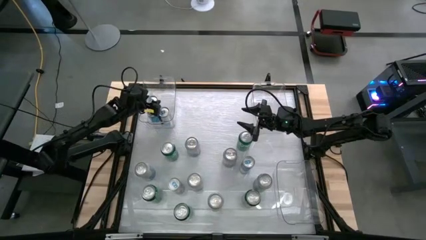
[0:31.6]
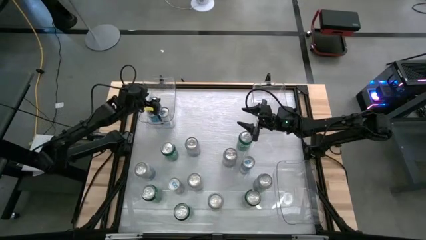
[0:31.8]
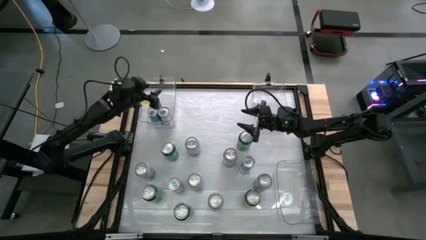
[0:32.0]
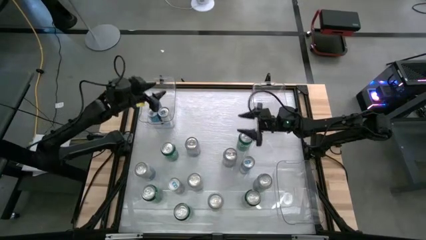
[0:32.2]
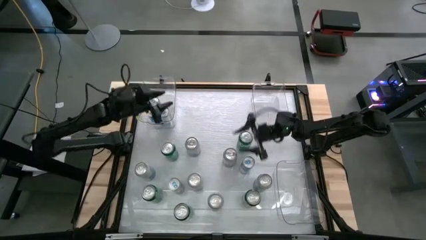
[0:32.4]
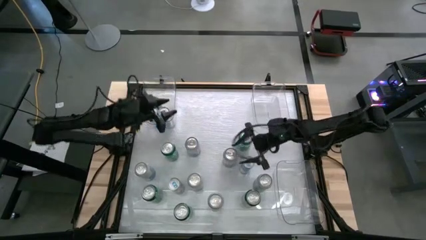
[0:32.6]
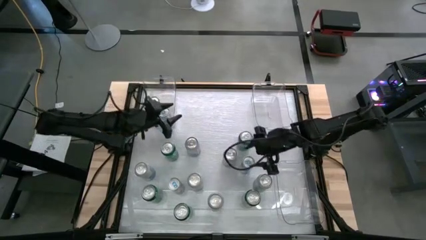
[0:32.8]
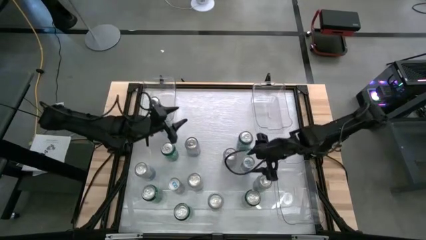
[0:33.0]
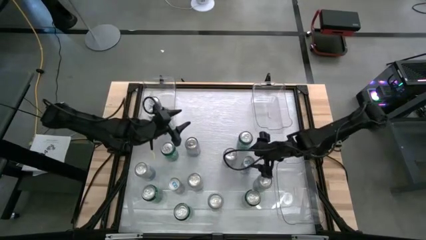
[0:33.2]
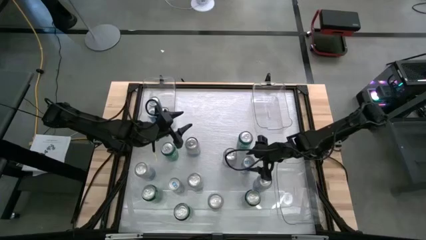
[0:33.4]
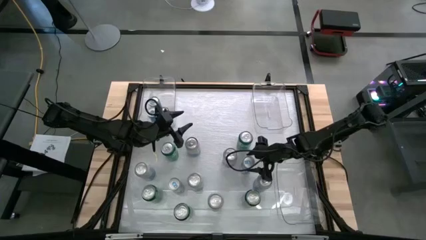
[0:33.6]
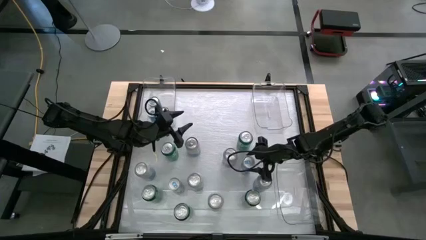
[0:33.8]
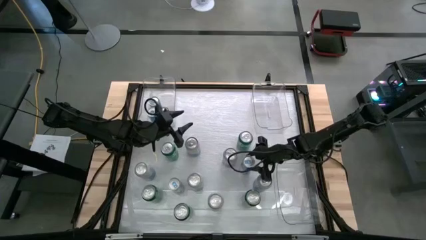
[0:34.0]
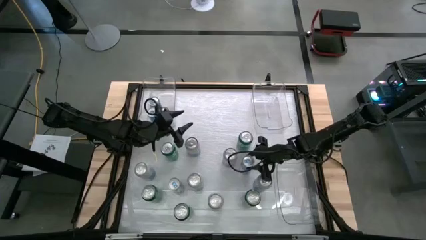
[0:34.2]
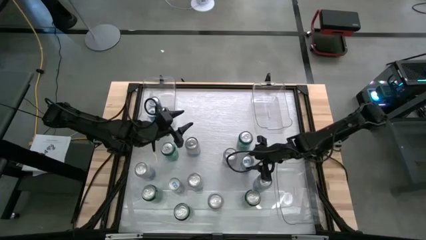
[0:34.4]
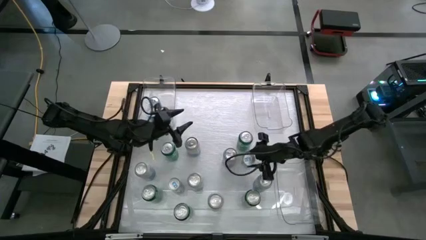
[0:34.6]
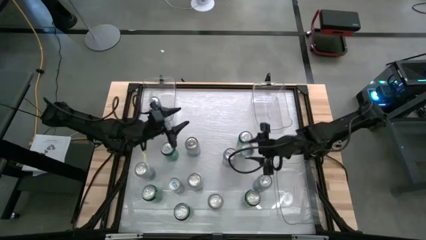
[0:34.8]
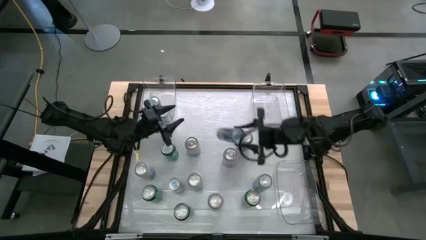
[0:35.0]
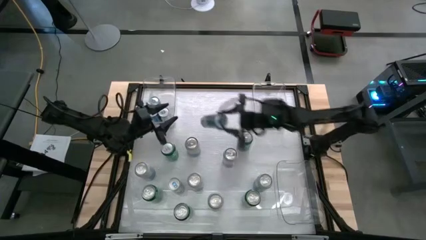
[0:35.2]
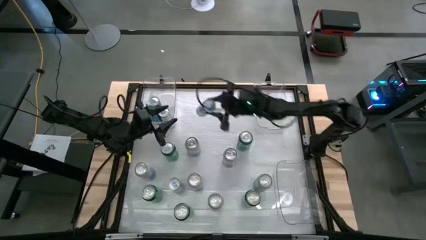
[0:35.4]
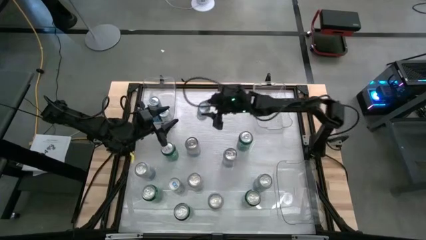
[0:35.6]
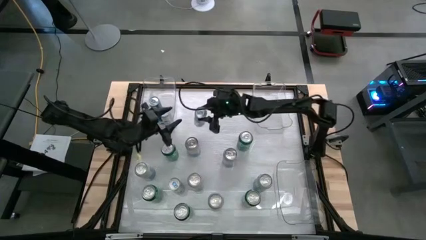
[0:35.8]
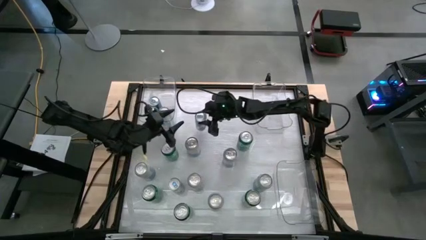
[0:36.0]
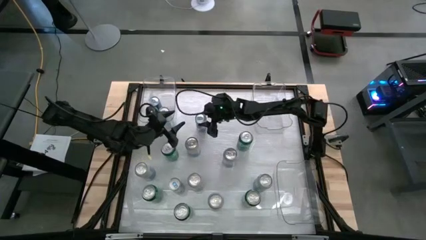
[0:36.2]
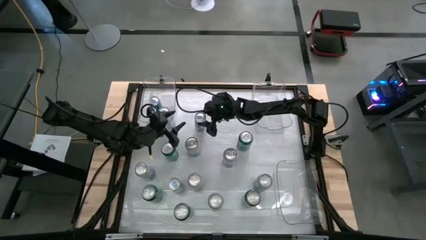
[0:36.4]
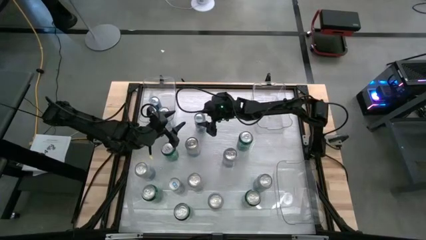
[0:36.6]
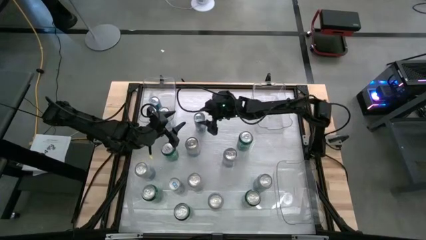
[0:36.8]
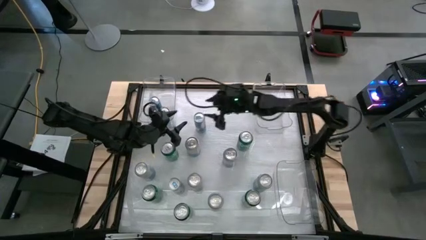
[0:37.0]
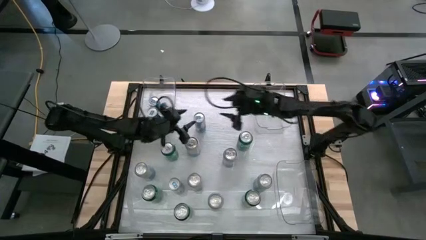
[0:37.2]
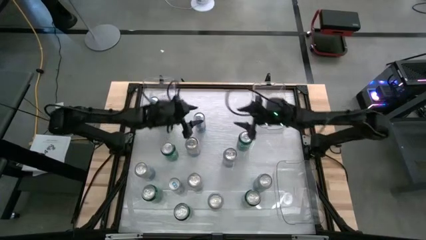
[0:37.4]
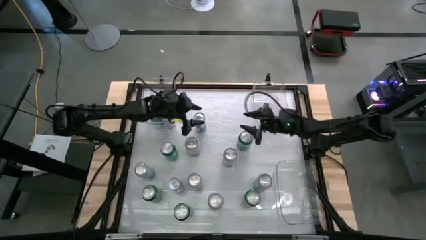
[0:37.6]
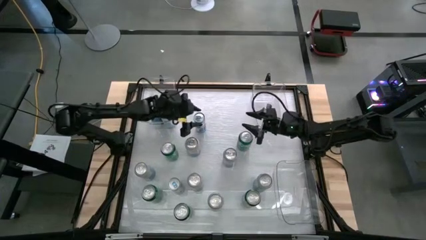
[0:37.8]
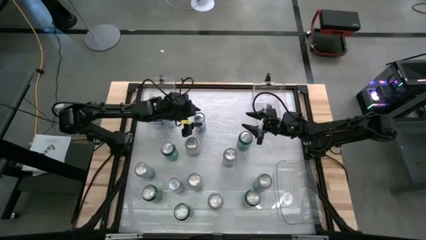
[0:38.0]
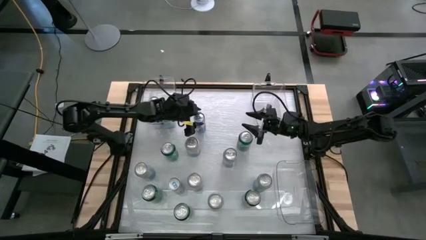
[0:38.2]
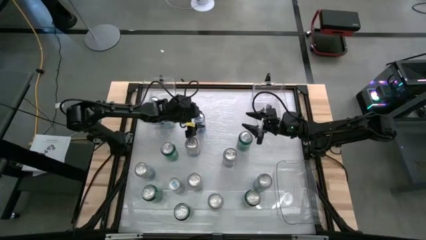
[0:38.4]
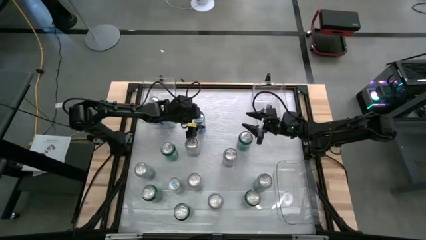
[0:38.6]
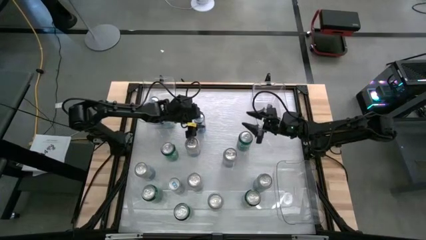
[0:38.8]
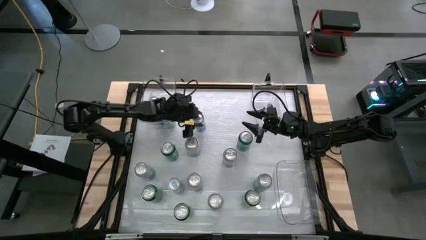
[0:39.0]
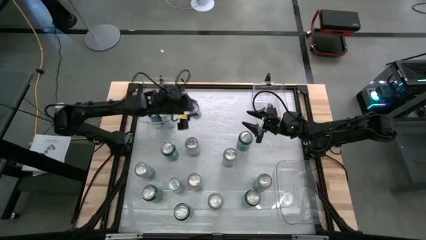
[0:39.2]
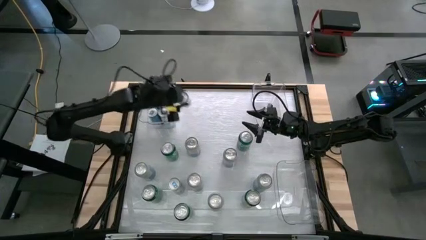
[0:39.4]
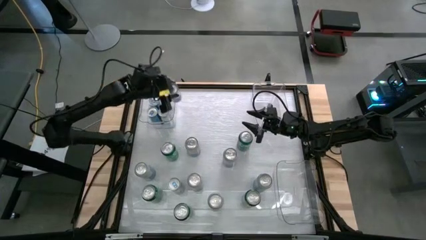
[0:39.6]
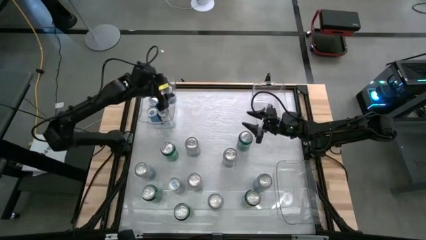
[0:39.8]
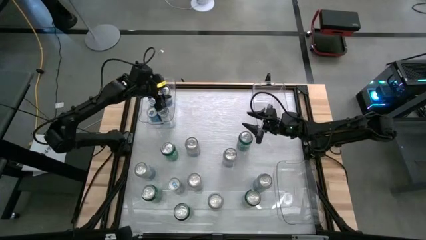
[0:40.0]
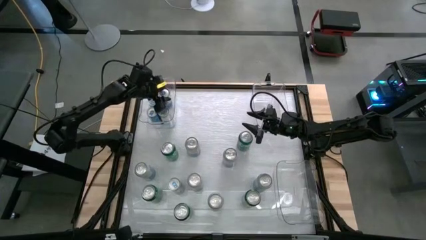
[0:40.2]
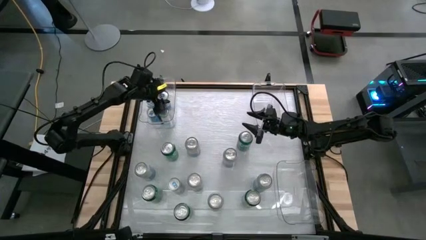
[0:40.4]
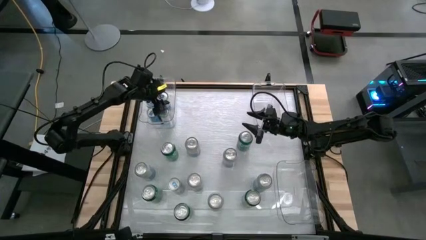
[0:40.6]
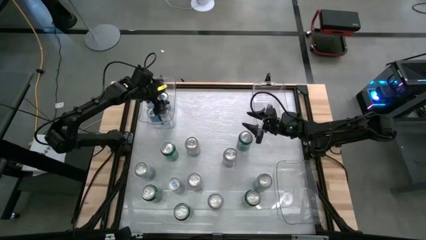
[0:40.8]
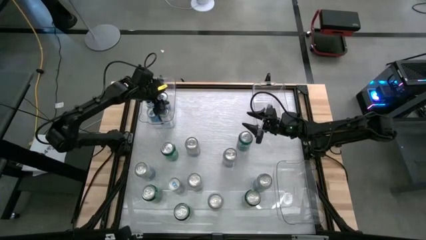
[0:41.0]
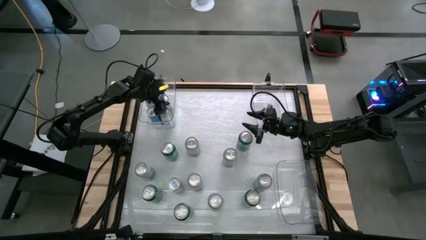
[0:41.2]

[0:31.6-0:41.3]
Task: Sort soda cans
Put the blue soda can into the top left transparent bin

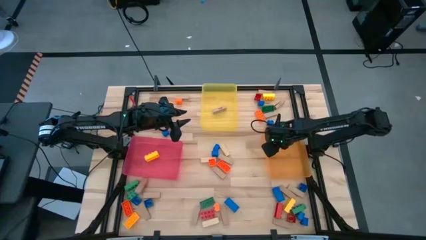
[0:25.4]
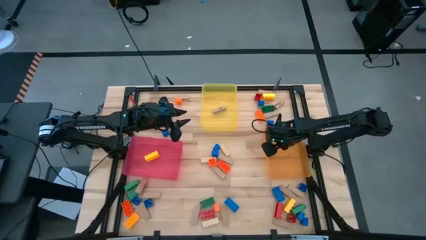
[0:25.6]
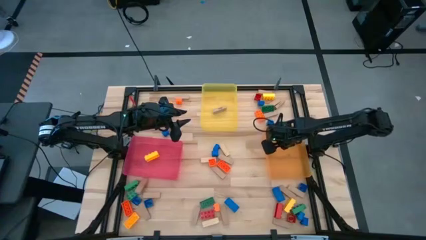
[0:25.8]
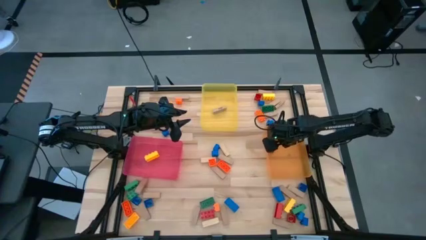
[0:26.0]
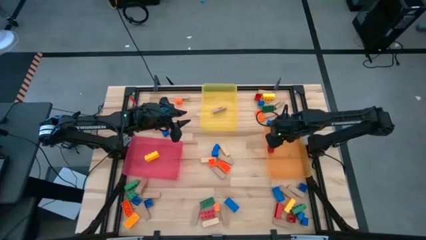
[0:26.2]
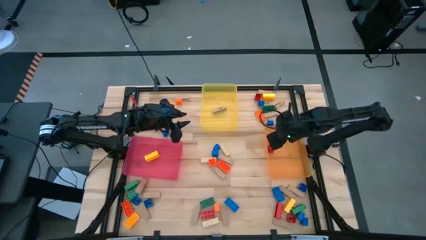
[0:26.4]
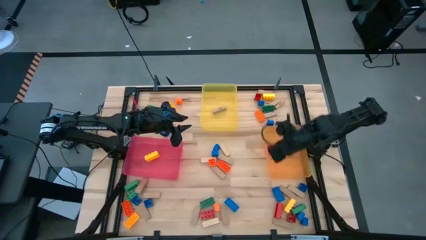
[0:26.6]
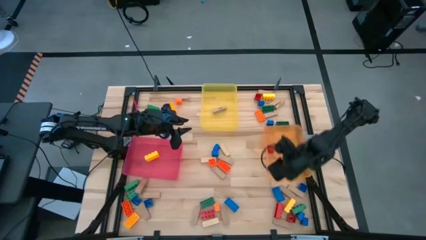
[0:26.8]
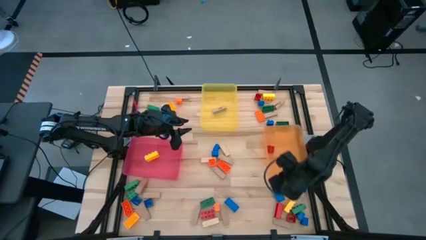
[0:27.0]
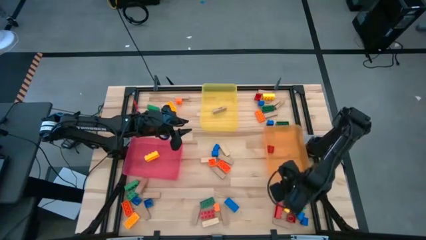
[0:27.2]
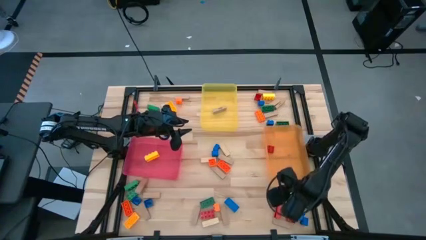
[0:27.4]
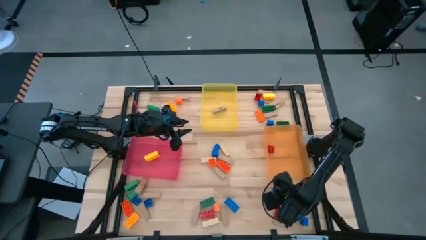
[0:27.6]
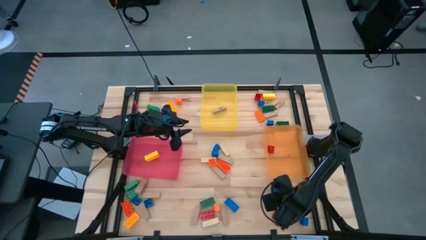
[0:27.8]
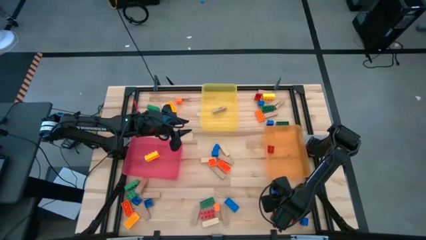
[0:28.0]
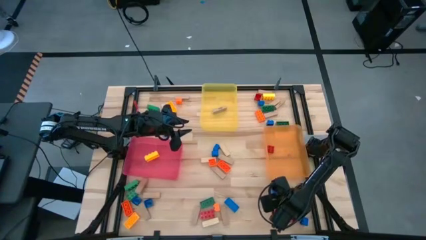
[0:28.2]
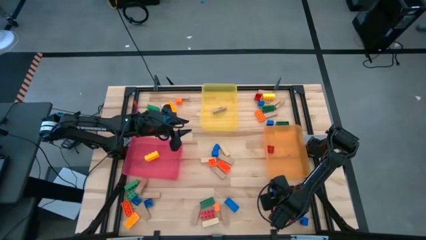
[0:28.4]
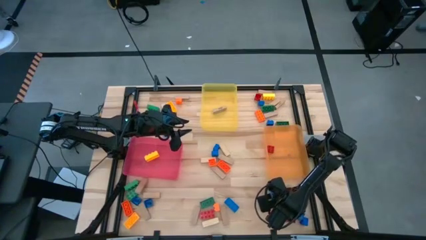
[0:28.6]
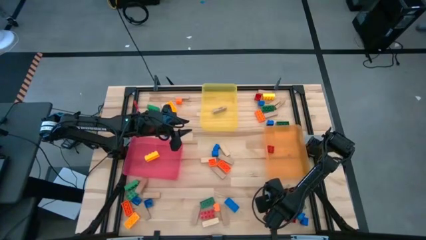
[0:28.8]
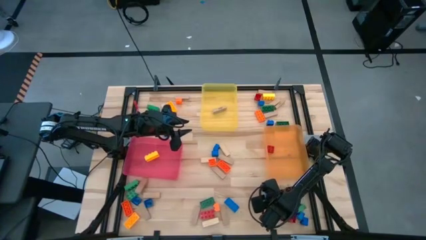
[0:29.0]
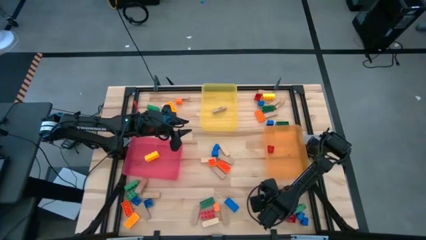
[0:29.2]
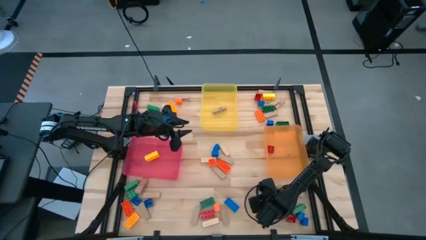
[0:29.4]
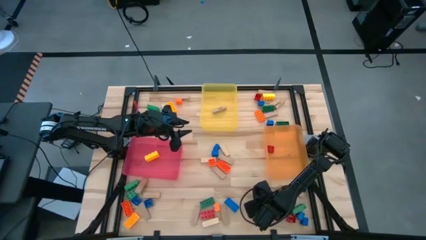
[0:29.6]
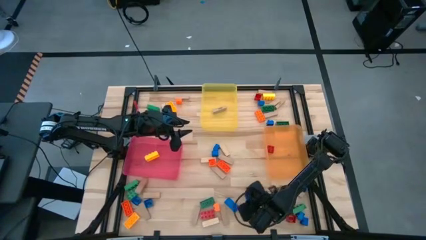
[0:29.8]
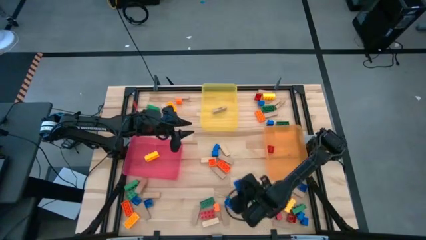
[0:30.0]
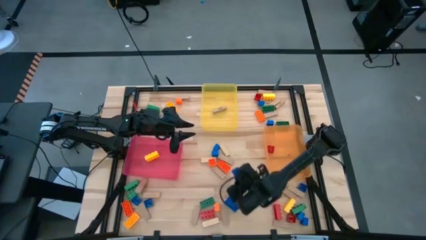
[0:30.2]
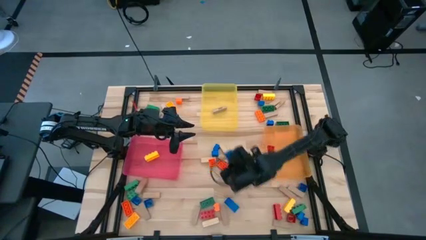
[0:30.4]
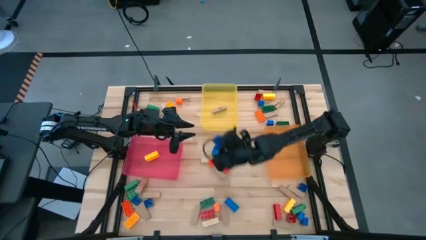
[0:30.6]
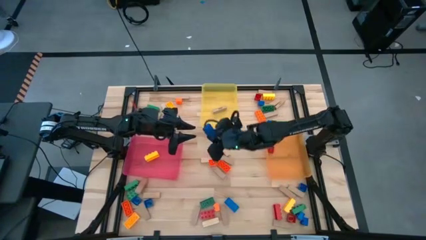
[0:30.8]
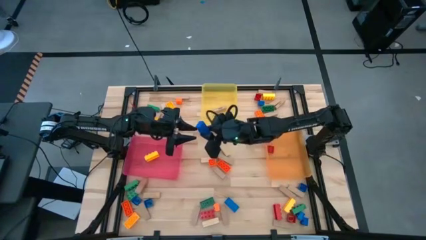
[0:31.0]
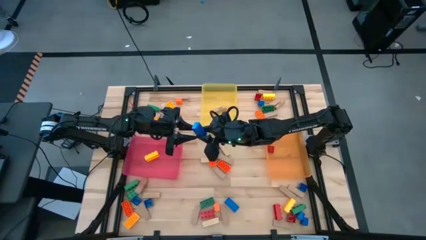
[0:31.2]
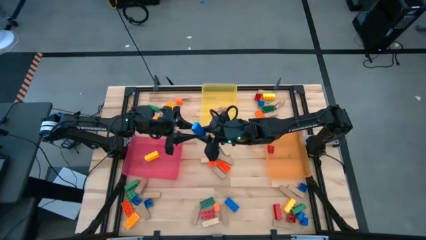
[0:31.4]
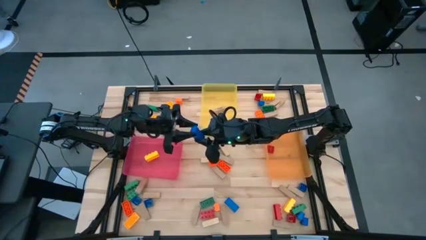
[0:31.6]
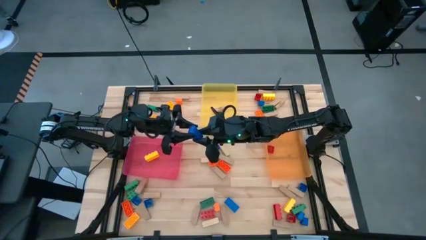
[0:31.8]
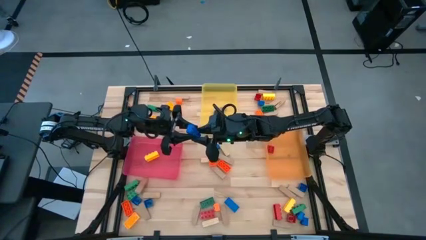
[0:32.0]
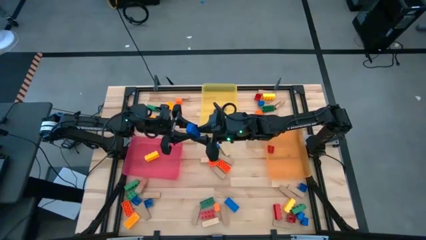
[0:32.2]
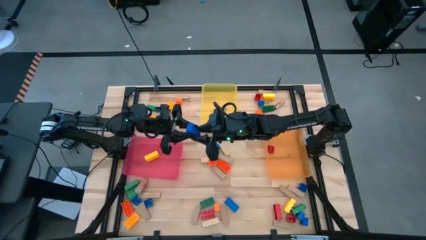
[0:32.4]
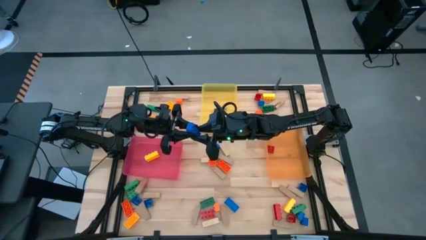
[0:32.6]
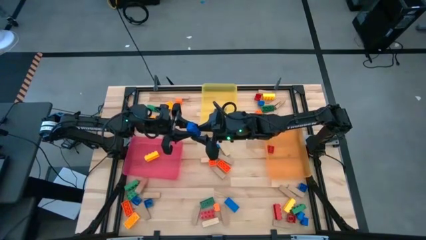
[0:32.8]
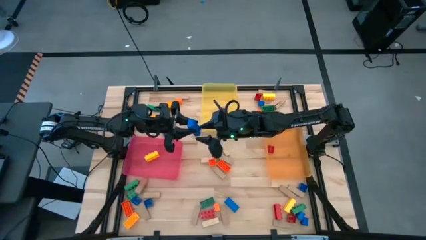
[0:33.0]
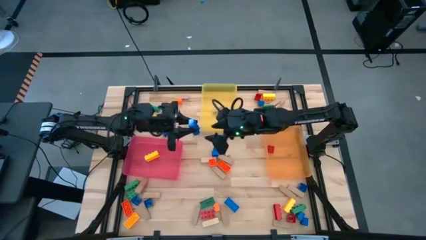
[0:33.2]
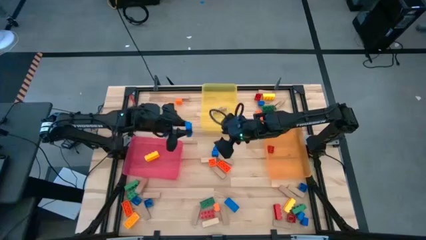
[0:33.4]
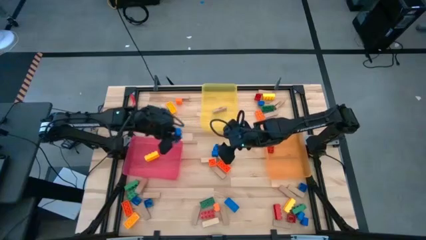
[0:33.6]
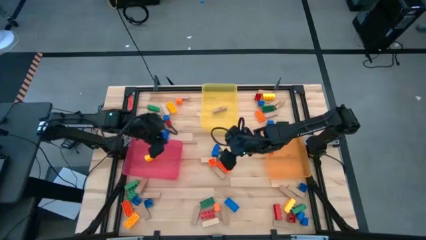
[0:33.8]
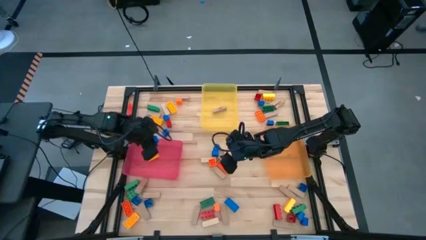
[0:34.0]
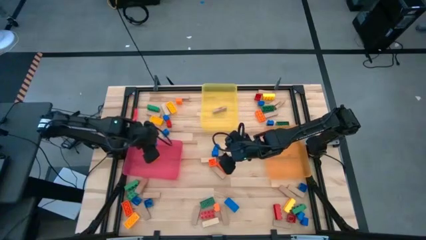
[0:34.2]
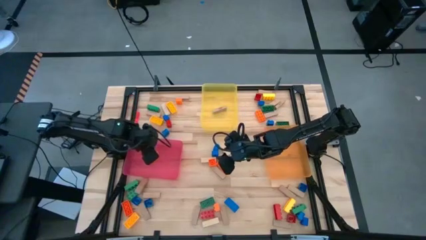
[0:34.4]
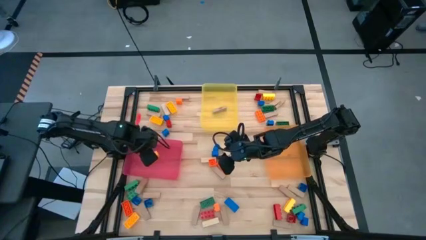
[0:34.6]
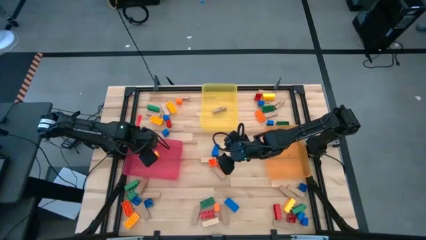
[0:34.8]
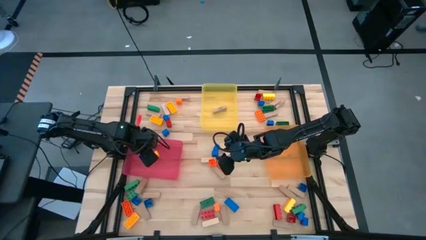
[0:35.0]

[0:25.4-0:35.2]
Task: Sort blocks by size
Put the 3 stud blue game piece into the pink bin
